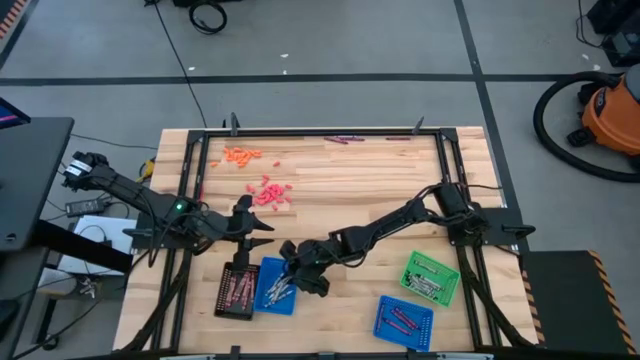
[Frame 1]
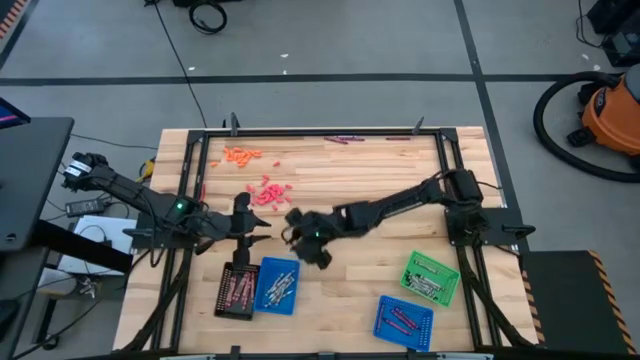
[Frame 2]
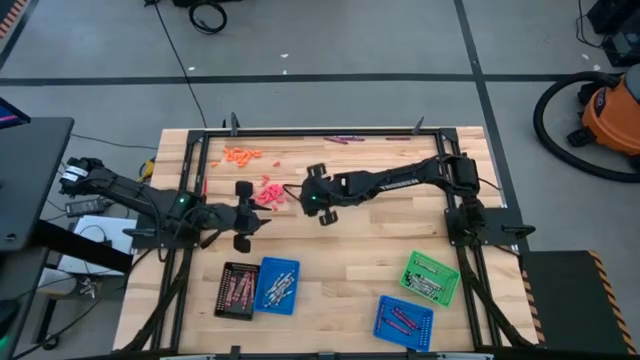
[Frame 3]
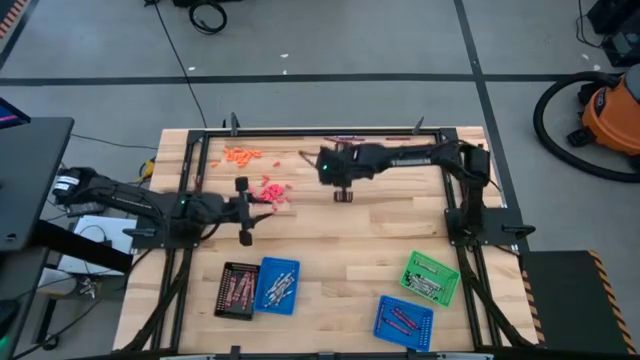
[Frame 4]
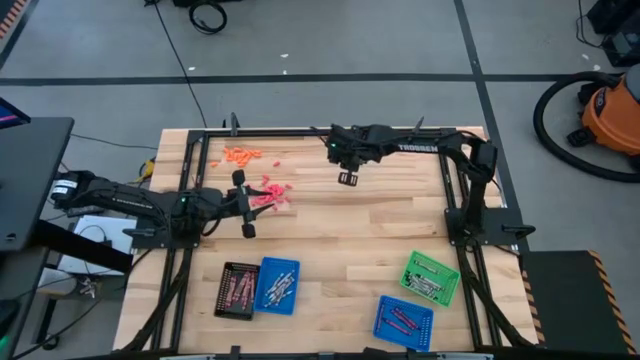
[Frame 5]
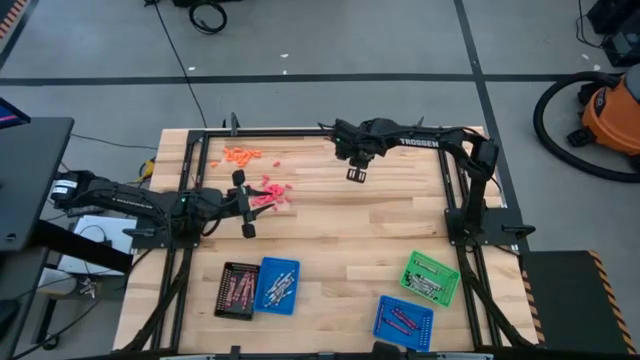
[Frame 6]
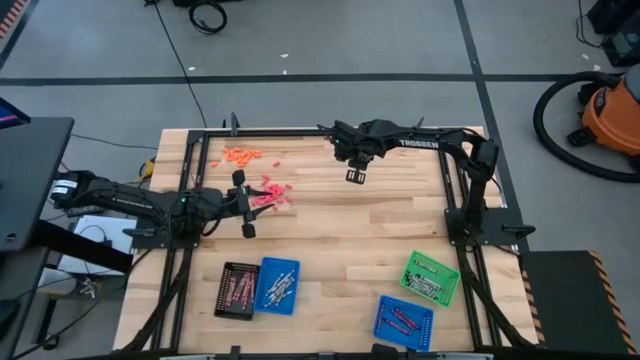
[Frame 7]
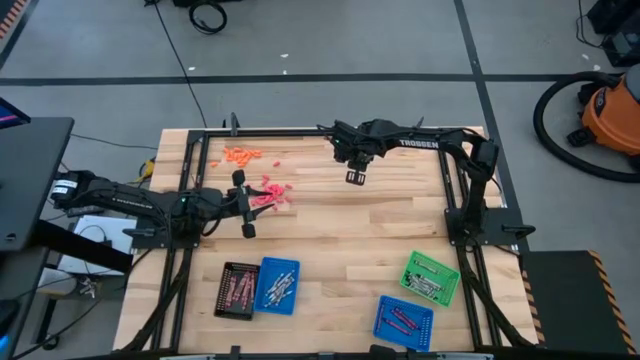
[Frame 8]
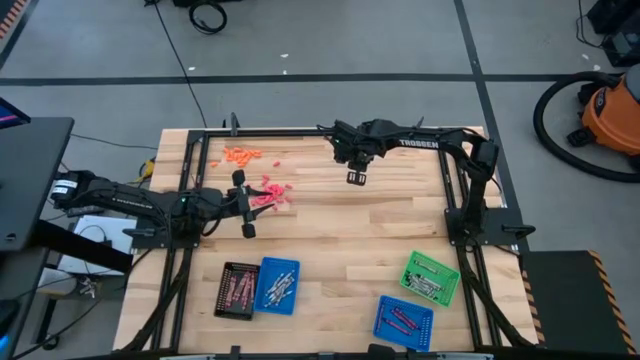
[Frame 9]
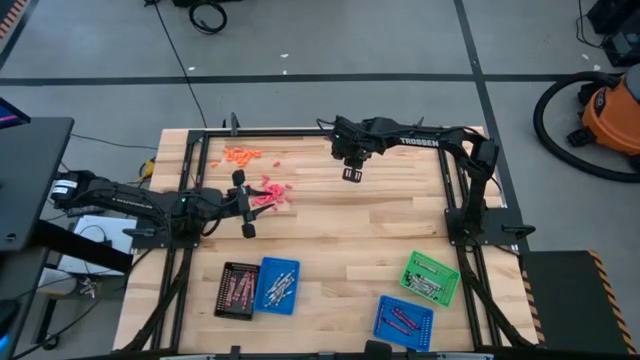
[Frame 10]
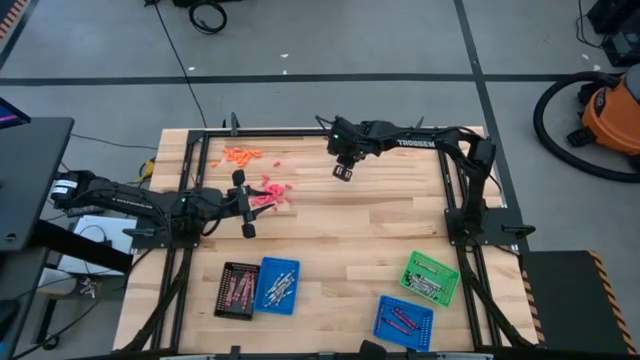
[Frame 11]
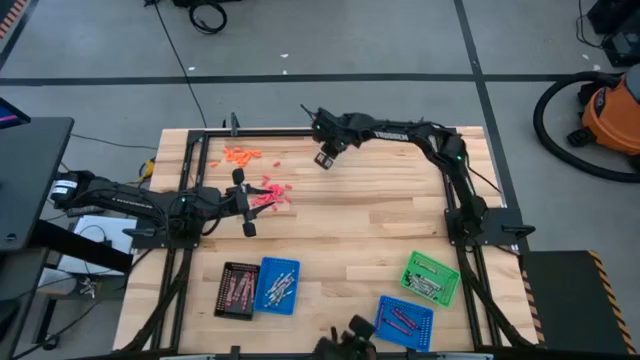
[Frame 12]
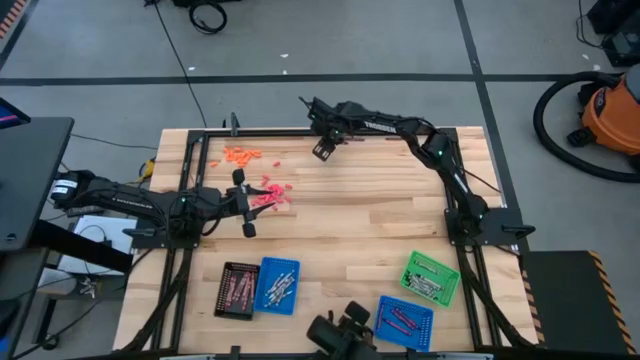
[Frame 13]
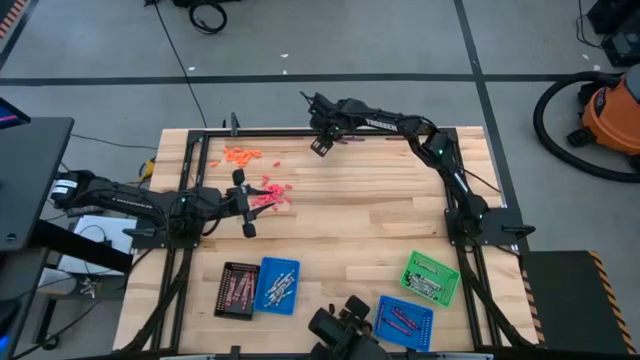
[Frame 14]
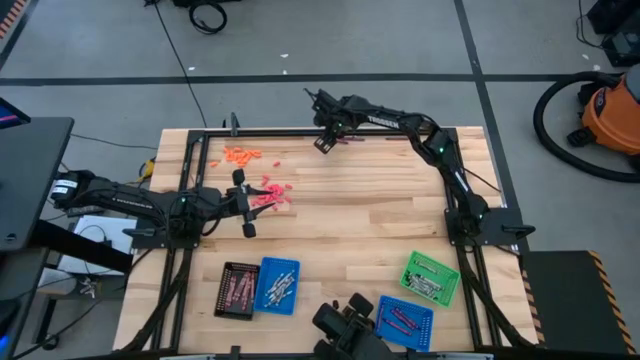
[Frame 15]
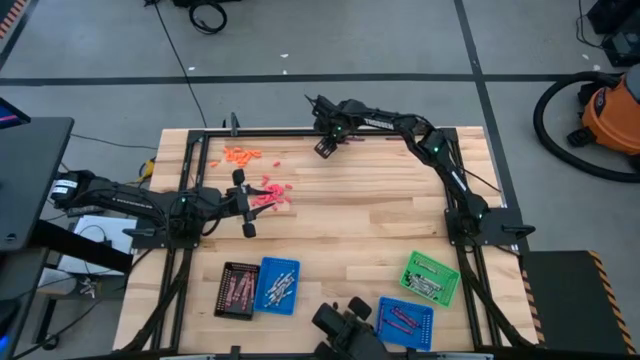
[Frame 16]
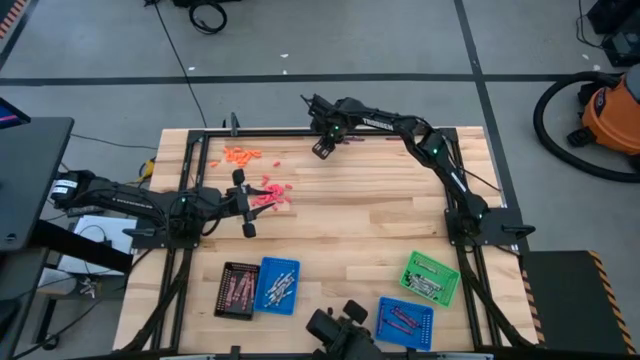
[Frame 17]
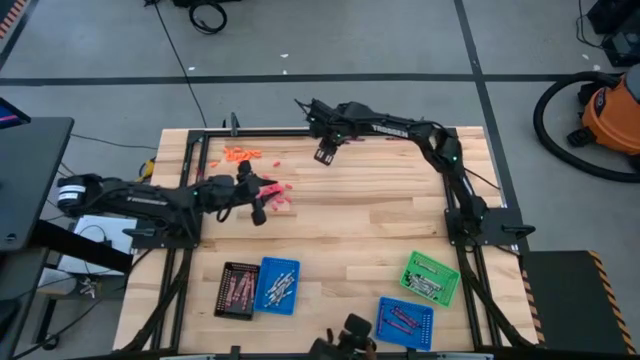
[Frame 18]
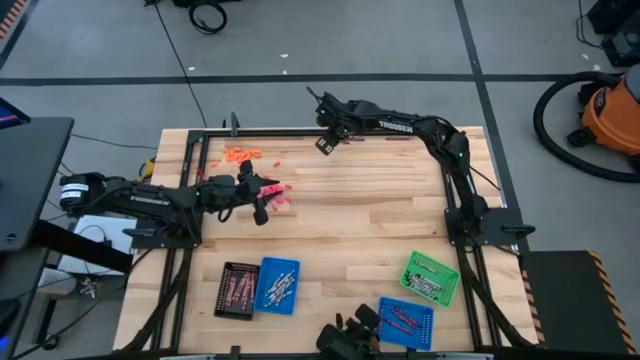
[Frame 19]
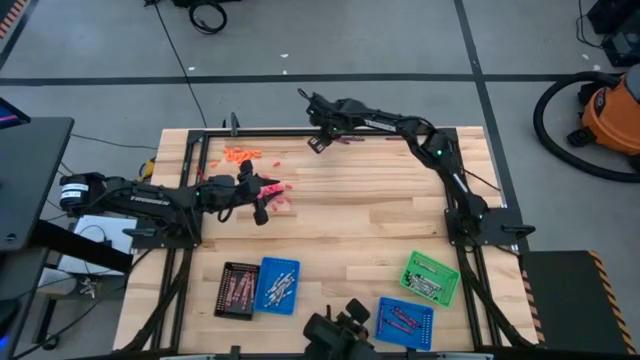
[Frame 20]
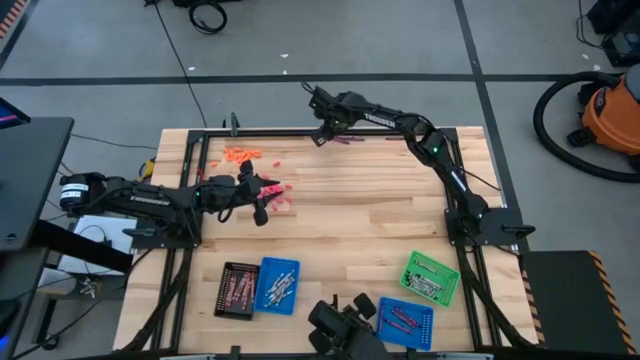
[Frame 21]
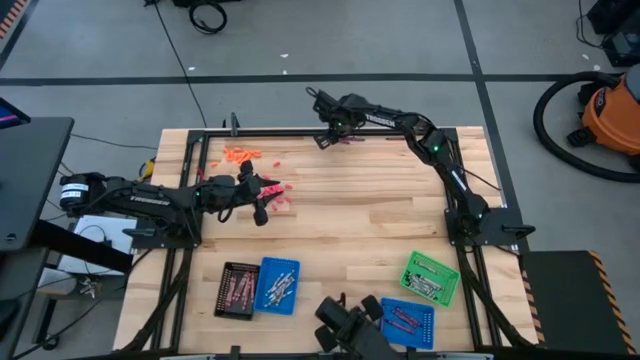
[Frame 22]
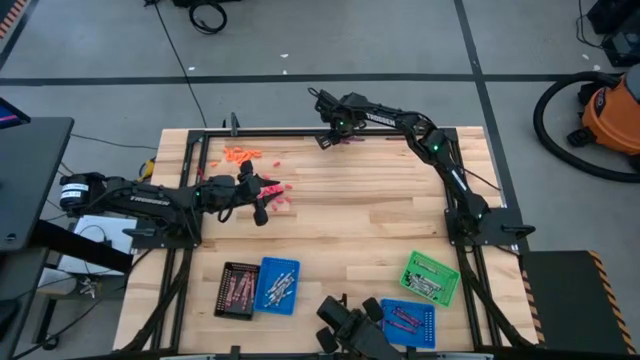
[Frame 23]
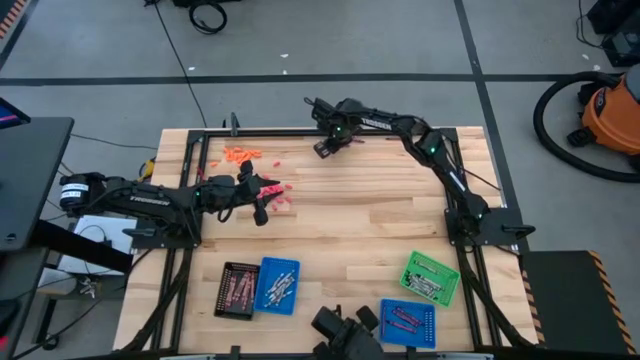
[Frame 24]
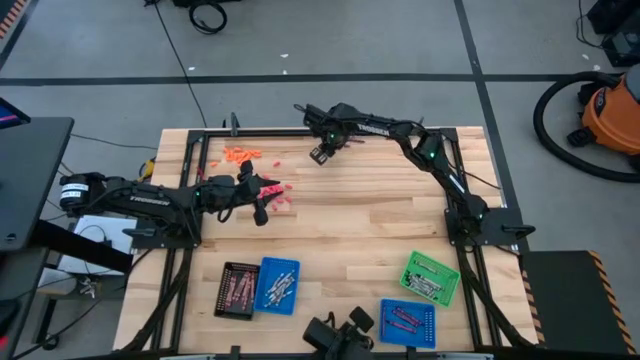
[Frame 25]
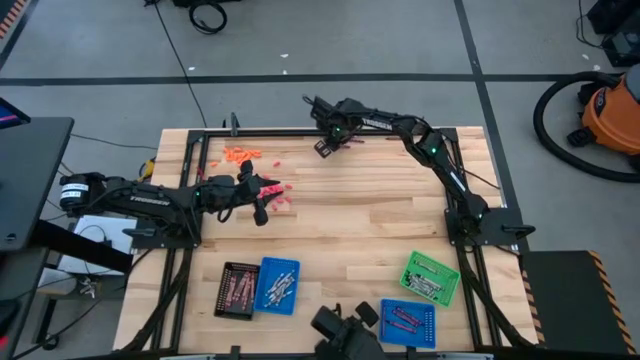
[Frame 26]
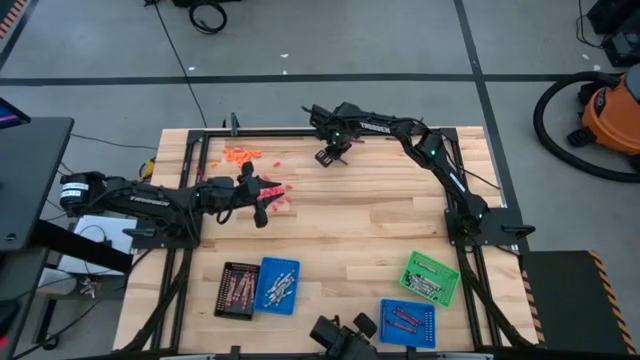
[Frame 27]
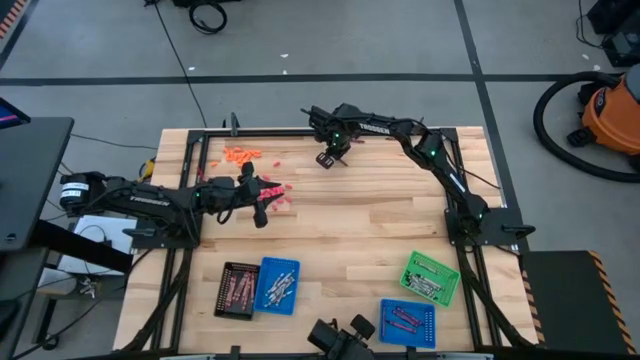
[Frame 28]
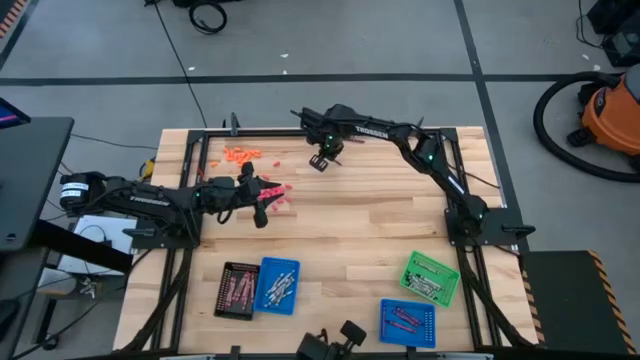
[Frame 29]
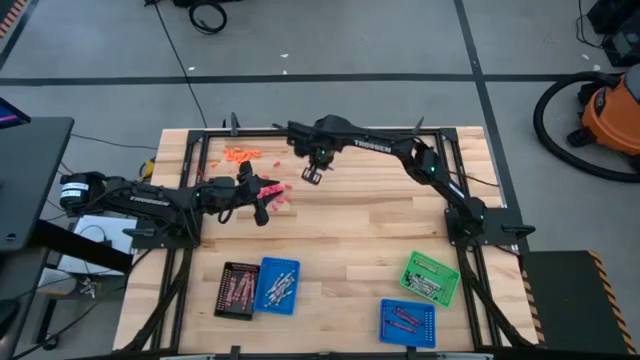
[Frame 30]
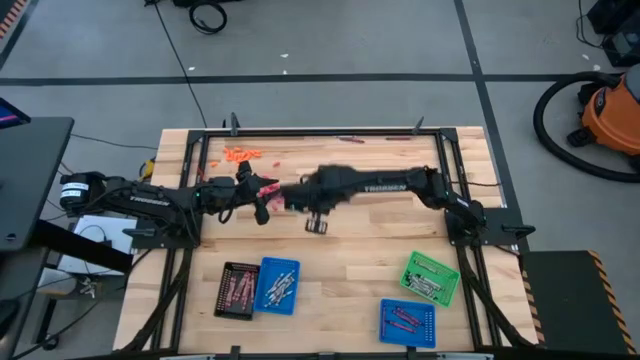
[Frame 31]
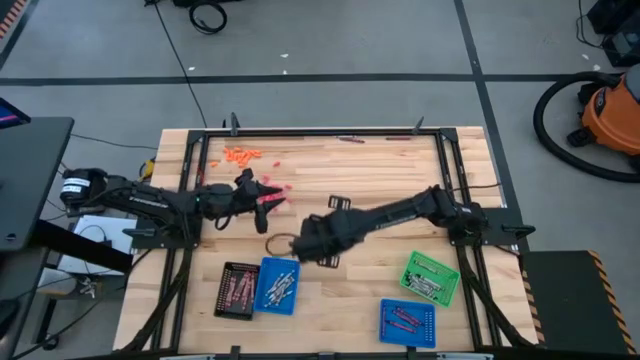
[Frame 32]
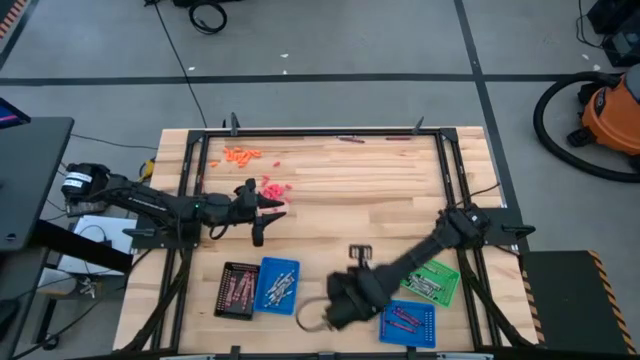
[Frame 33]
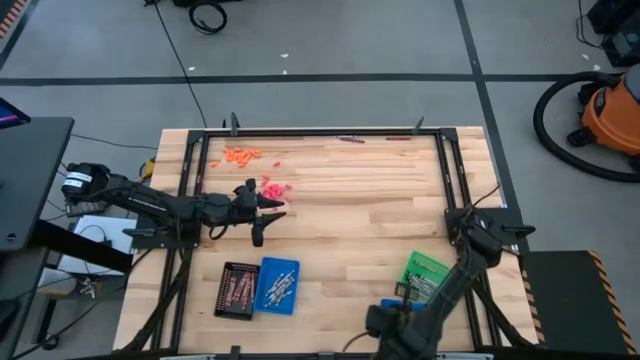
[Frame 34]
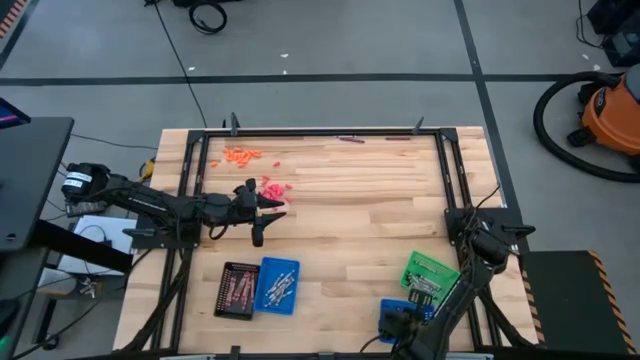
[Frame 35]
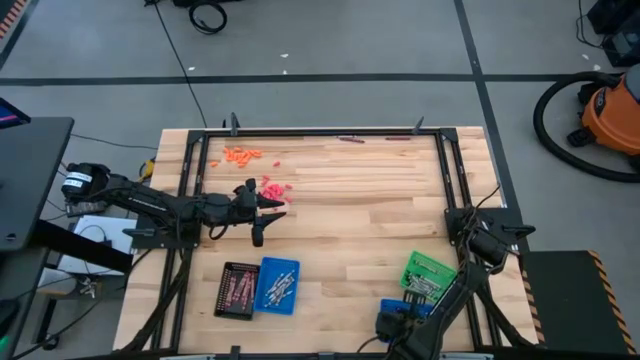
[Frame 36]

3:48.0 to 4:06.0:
Task: Sort crayons
Put the red crayon into the right blue bin

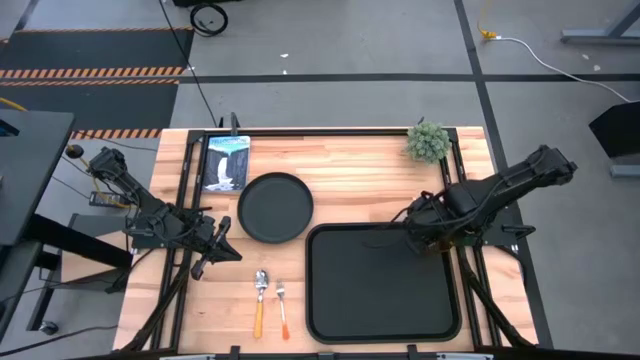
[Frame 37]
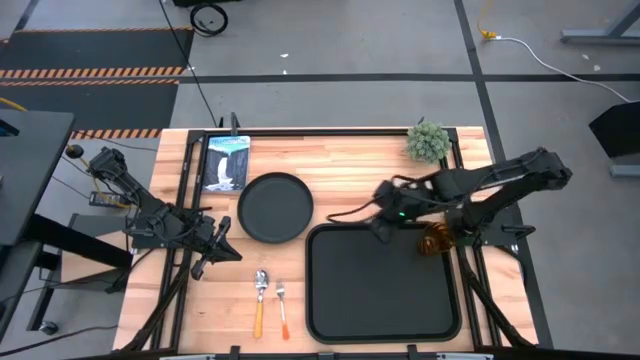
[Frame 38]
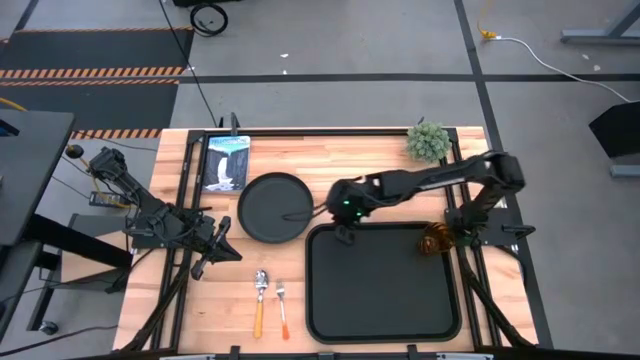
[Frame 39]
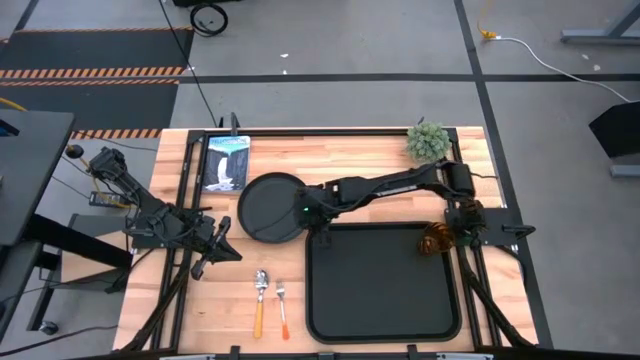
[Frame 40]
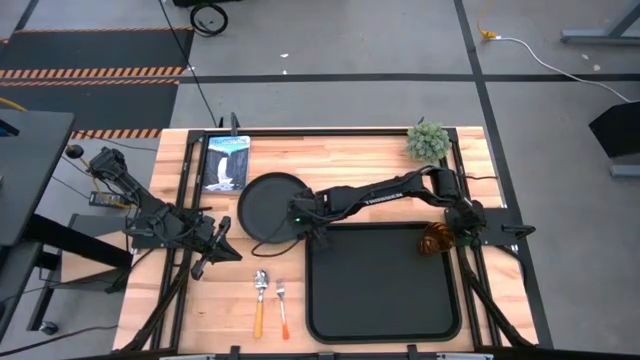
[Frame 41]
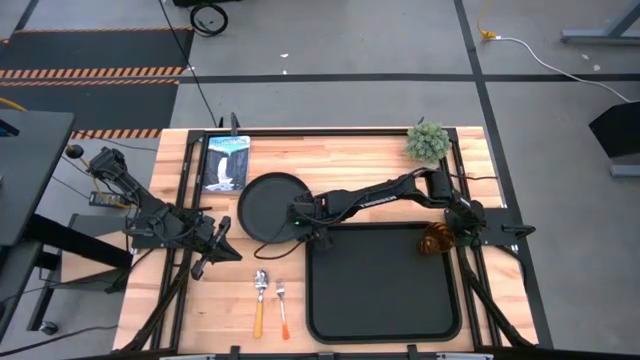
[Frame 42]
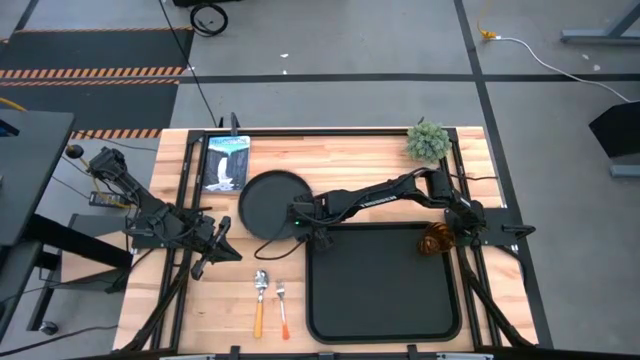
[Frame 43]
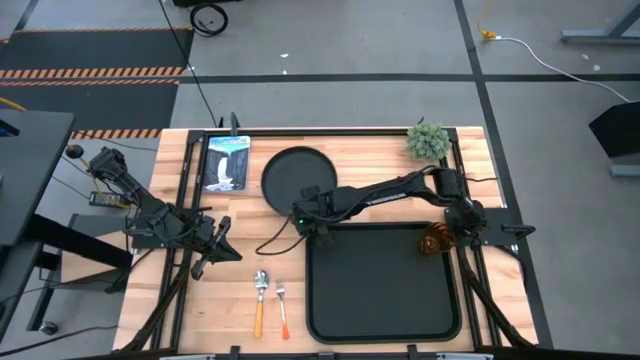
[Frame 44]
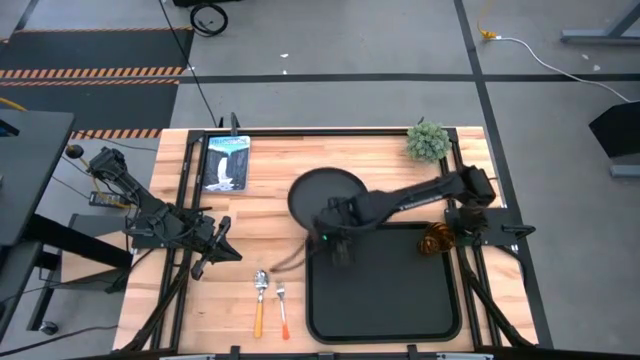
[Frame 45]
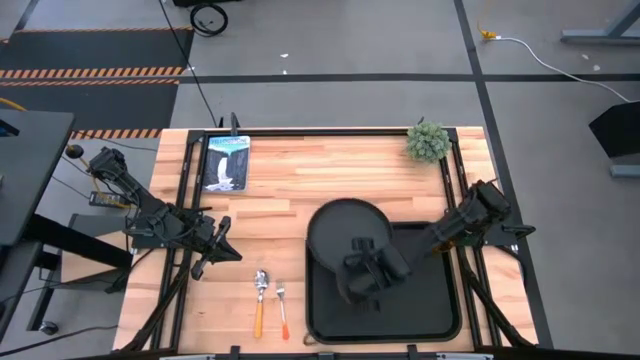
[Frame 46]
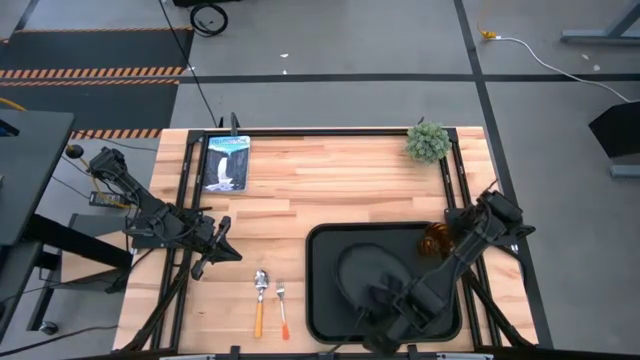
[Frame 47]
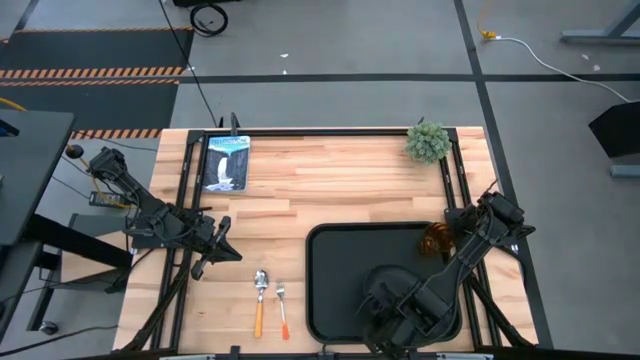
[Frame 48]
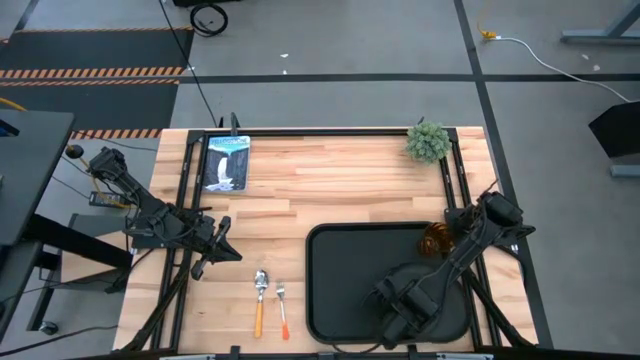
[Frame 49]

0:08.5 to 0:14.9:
Task: Pick and place plate/cup/fork/spoon on tray
Put the black plate on the black tray
